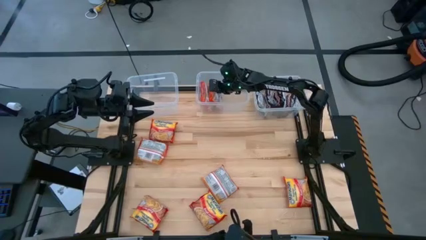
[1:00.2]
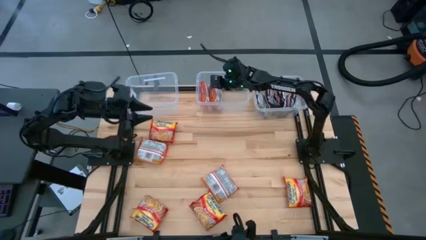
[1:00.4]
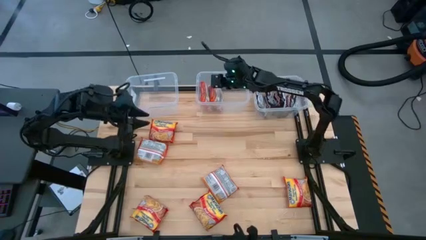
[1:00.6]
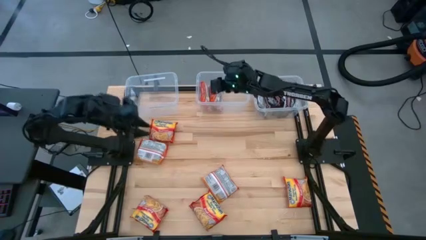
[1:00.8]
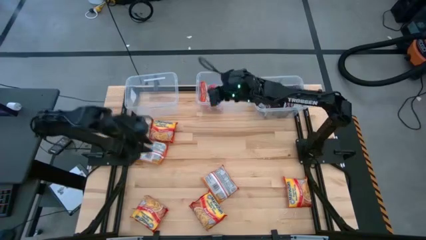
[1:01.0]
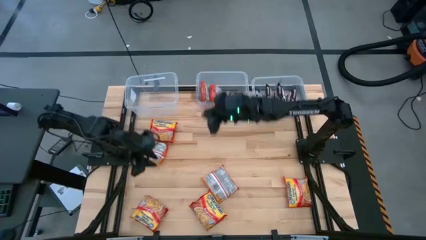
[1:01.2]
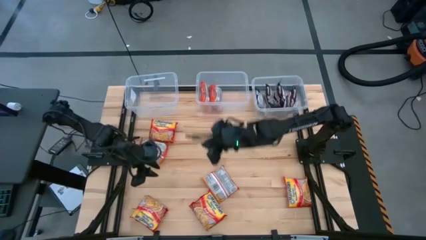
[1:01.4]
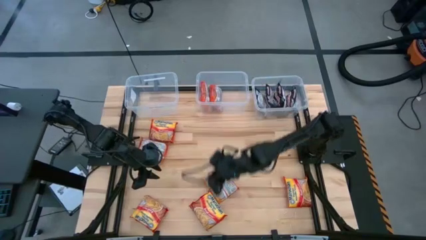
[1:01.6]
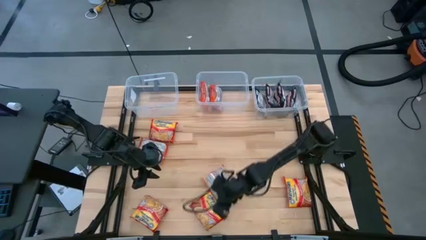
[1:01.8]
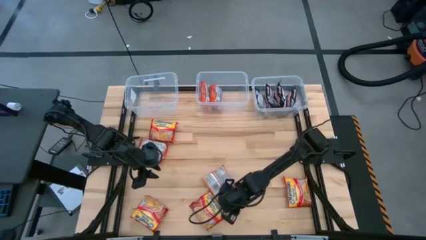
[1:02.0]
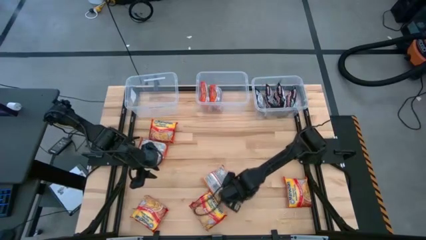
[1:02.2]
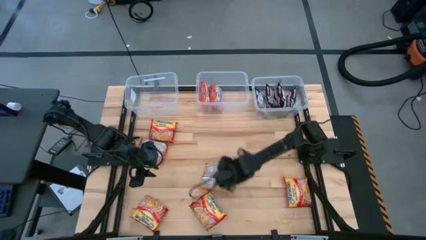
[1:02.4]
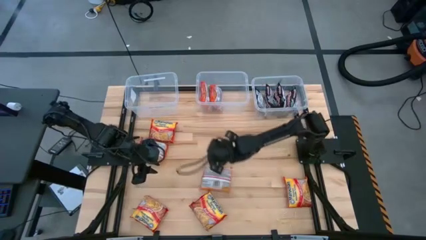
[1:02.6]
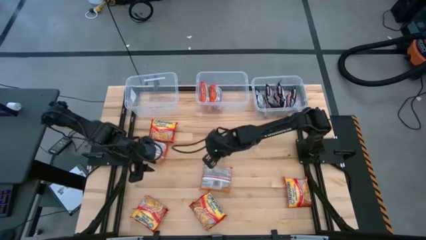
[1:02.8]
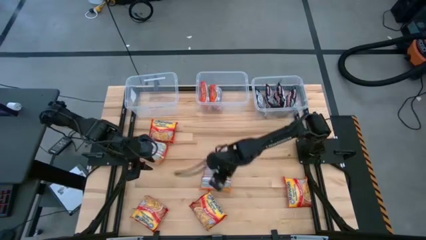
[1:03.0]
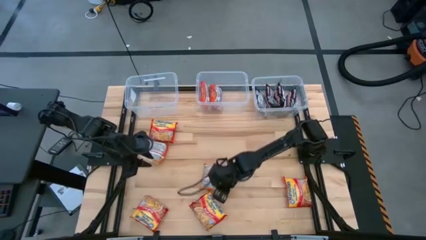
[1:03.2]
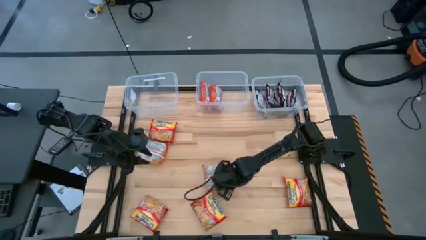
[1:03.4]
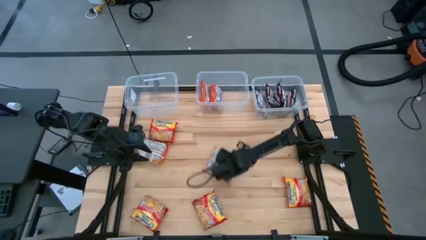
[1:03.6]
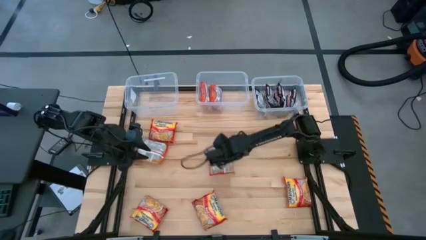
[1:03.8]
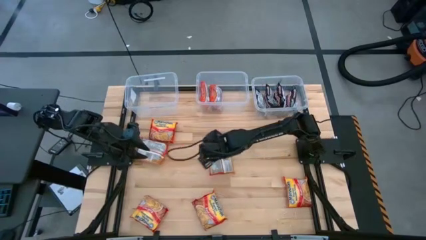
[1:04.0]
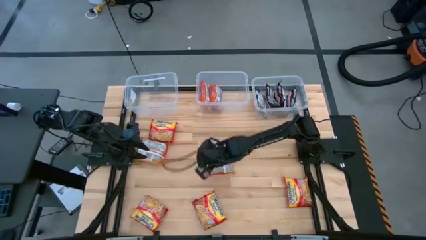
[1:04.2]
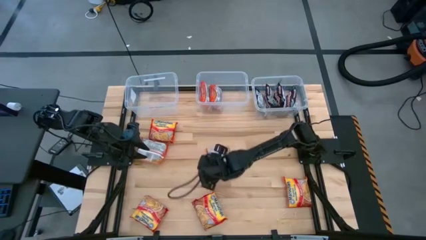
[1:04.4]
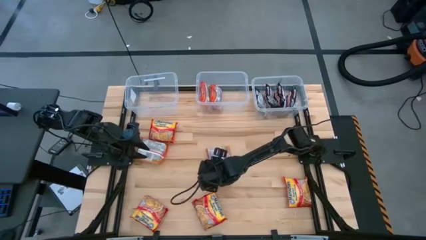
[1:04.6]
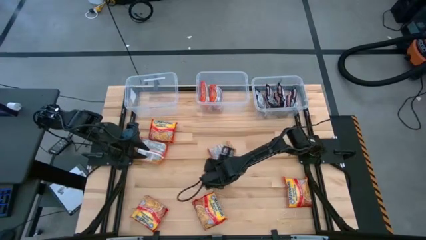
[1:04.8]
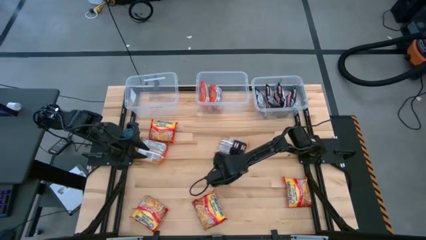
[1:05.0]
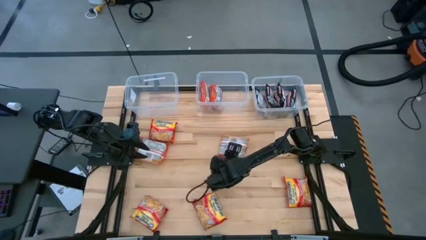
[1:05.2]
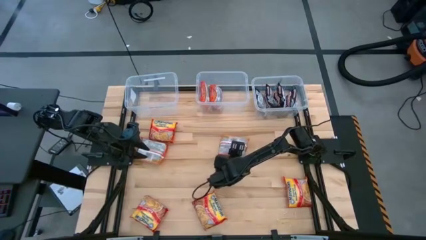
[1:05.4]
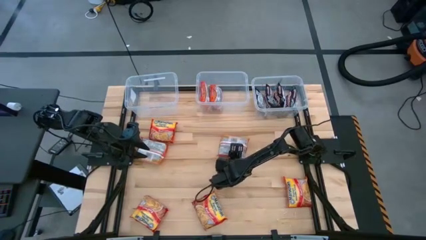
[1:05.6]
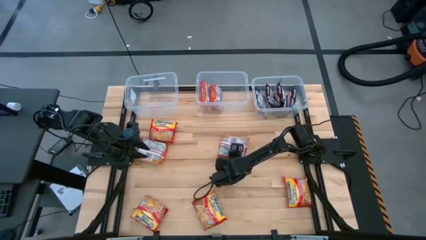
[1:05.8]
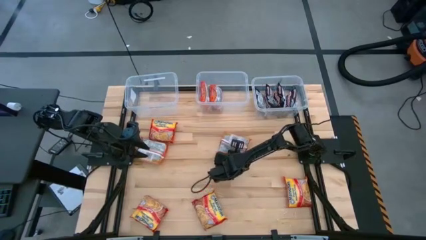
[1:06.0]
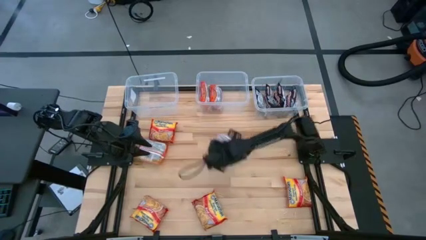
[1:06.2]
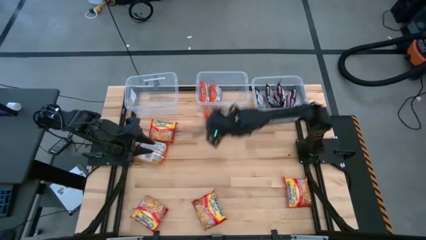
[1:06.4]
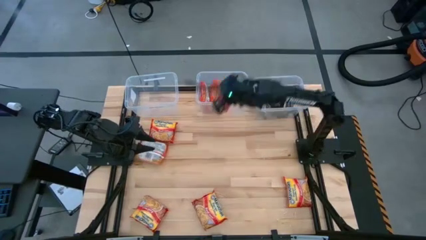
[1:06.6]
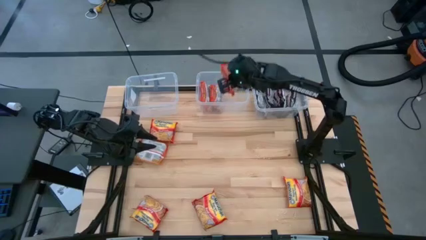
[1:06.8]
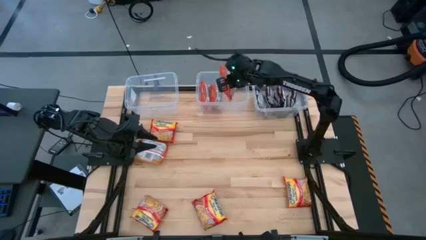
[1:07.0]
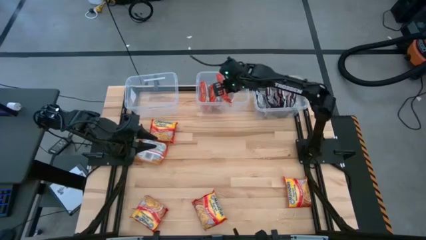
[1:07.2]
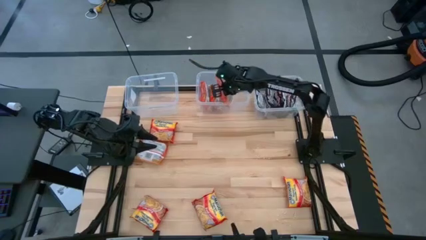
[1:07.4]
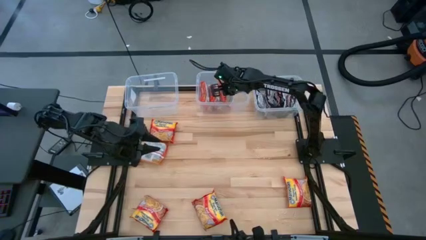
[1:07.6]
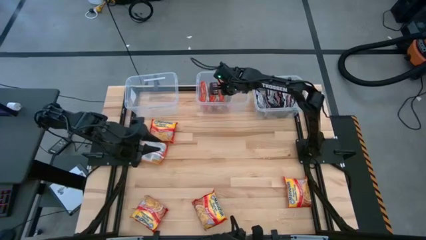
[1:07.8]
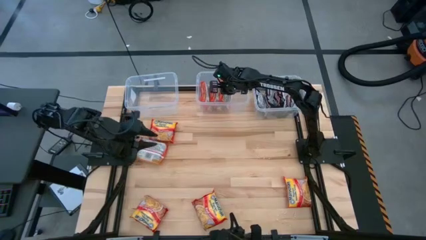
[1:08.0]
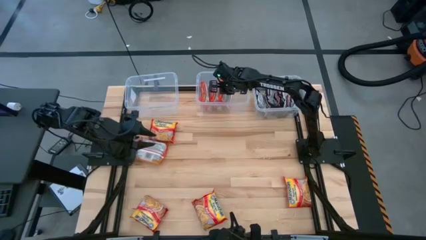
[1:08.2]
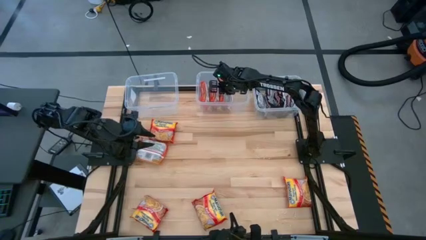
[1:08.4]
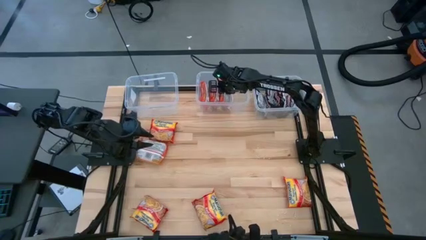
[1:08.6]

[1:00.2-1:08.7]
Task: Sort Maruchan noodles
Put the orange noodle pack into the top center transparent bin

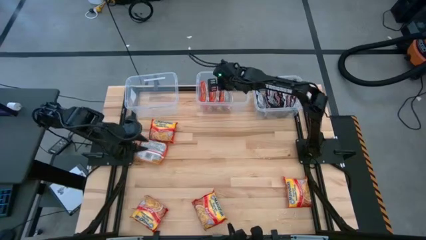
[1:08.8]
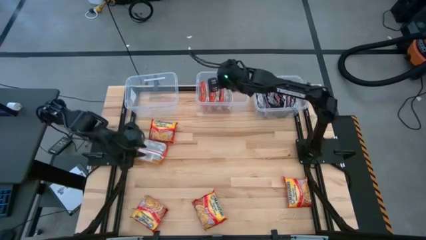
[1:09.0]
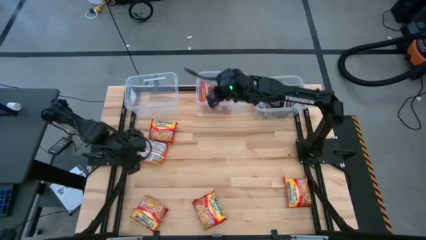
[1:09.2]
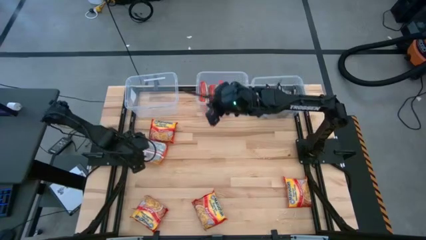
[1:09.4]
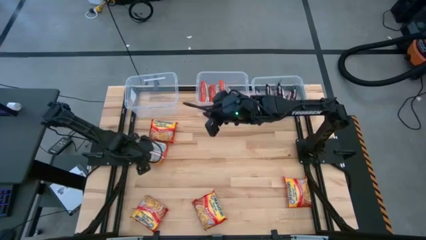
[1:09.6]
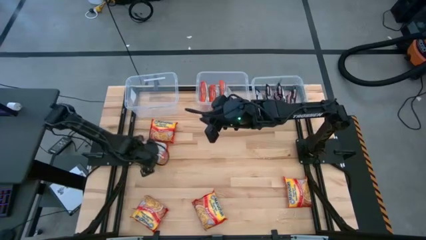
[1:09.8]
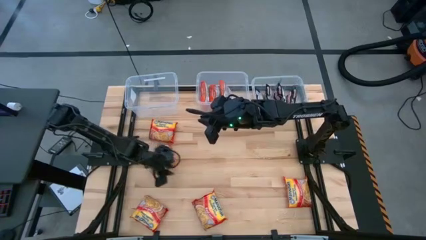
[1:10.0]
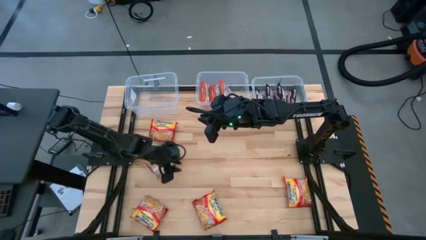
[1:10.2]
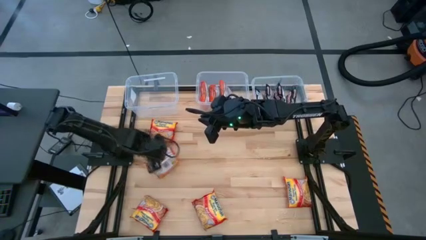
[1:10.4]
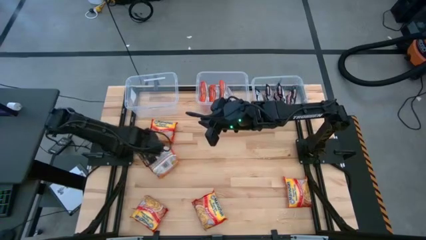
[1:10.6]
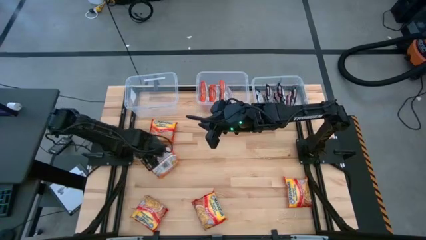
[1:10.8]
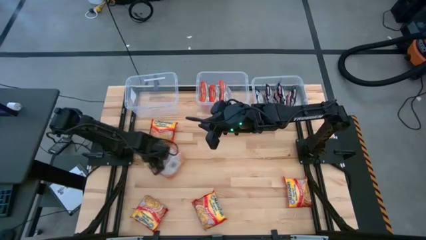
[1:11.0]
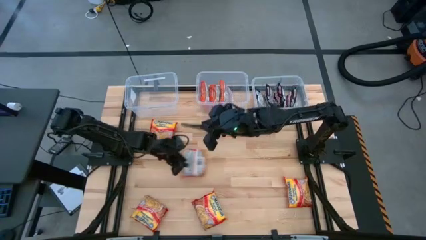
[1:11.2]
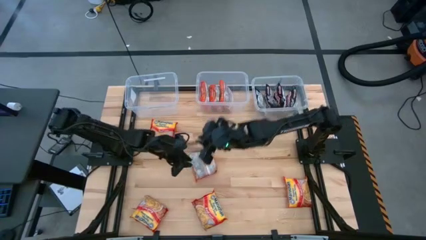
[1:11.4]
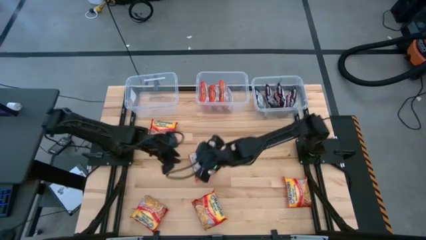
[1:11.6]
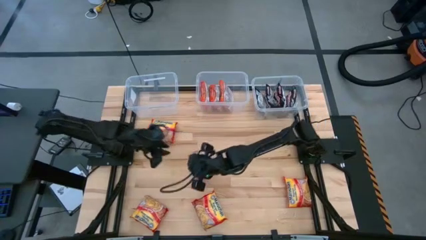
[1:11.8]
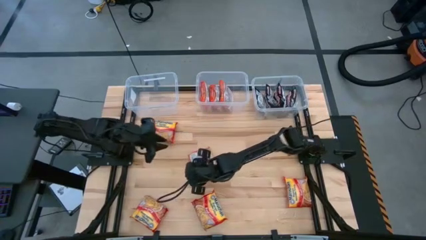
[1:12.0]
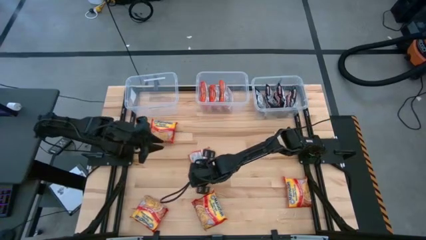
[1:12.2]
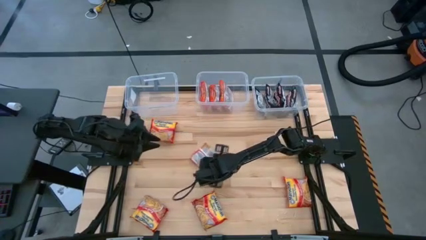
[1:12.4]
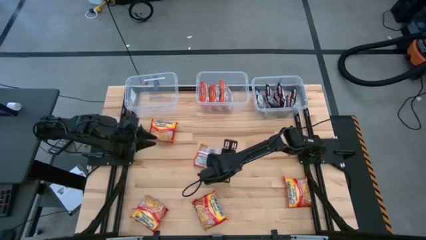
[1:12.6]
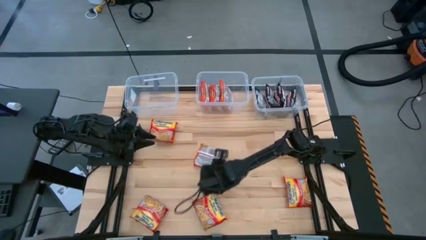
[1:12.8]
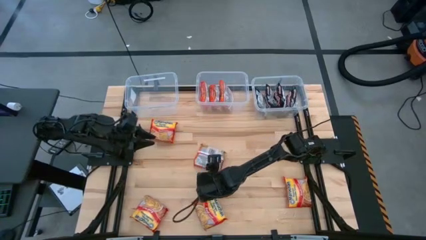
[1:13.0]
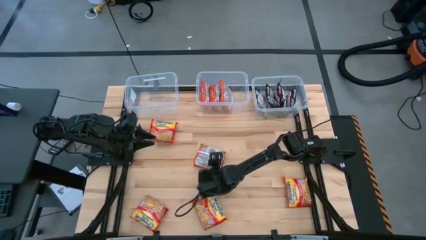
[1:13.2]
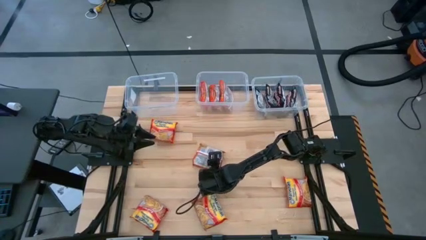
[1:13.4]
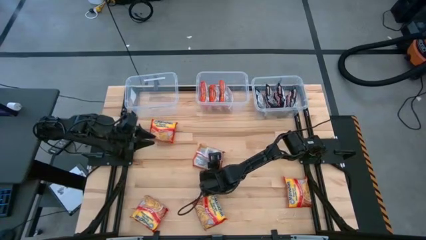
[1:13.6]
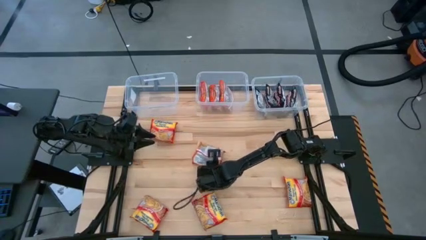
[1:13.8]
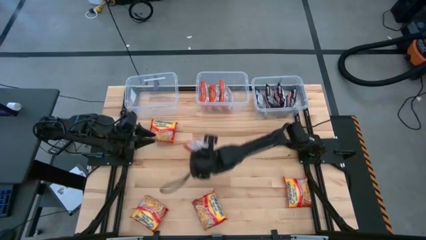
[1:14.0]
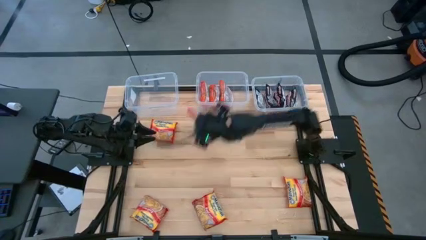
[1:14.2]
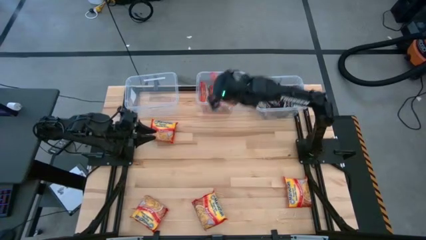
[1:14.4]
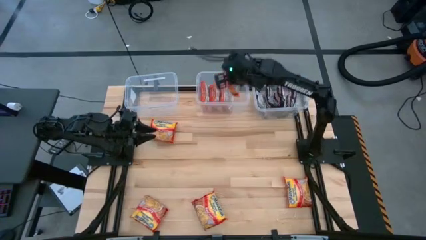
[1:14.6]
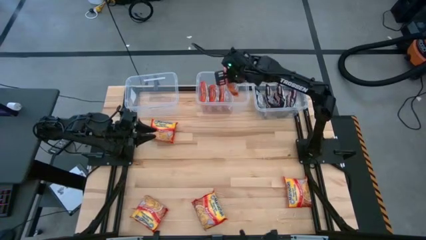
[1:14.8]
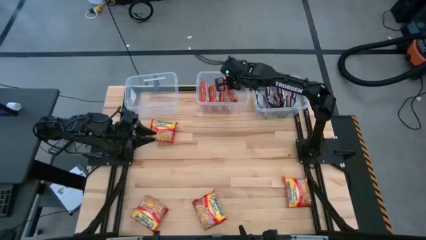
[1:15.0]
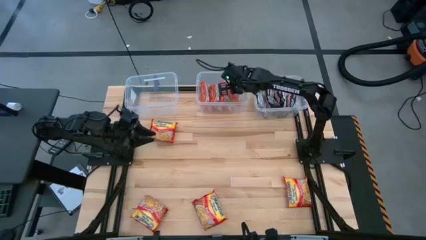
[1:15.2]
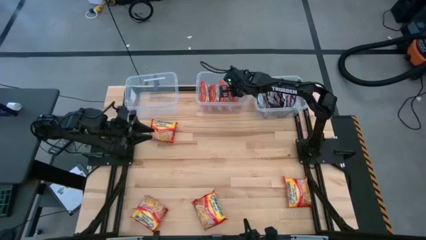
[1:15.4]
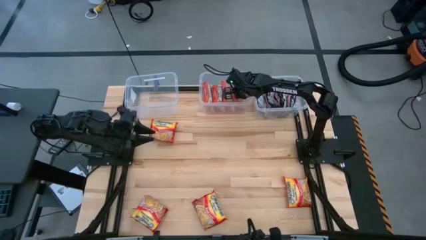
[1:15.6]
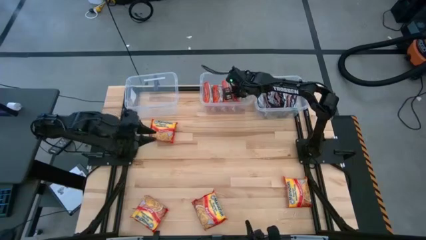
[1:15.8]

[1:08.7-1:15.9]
Put the orange noodle pack into the top center transparent bin
